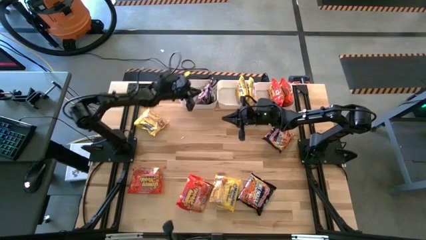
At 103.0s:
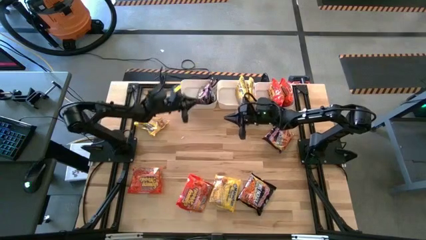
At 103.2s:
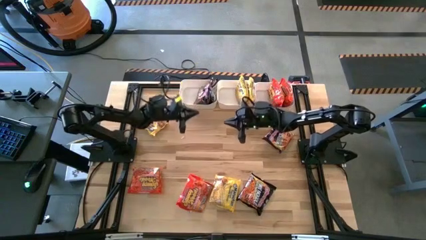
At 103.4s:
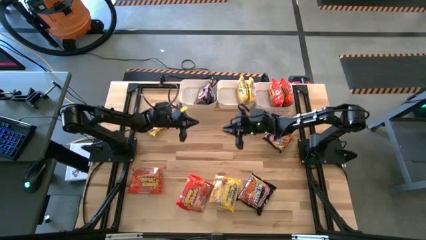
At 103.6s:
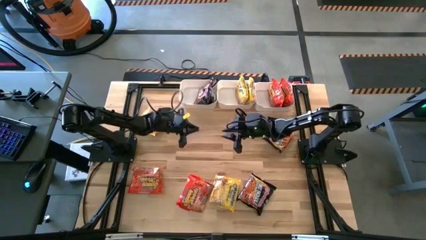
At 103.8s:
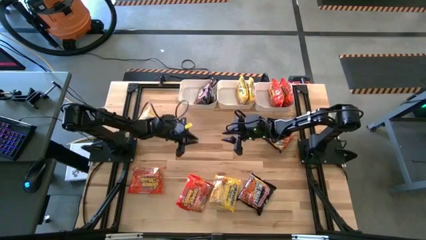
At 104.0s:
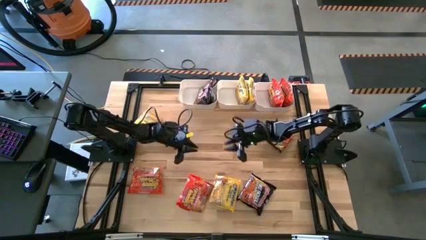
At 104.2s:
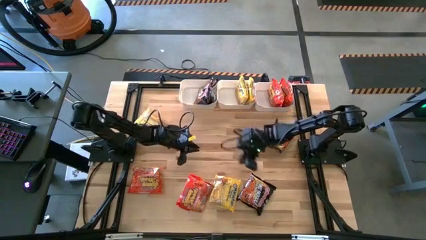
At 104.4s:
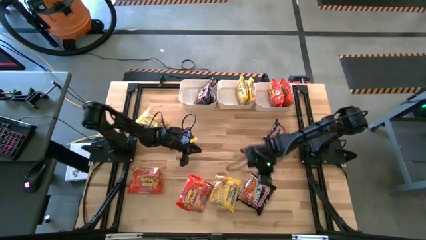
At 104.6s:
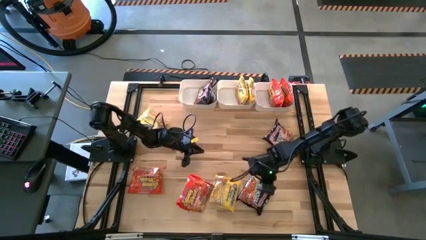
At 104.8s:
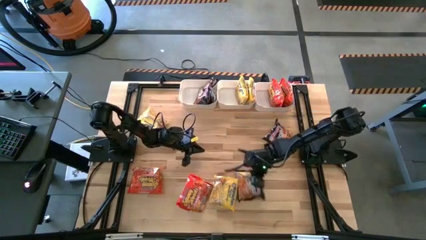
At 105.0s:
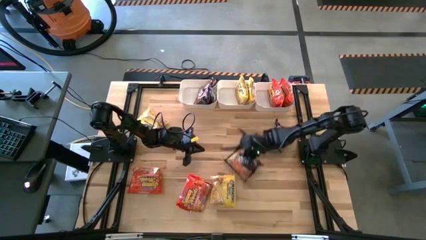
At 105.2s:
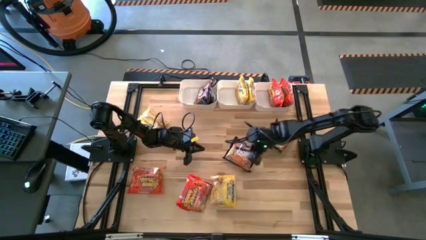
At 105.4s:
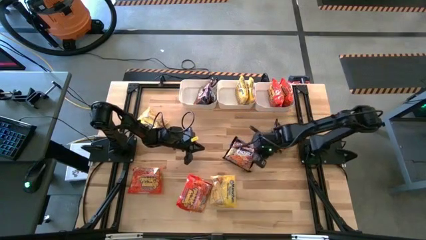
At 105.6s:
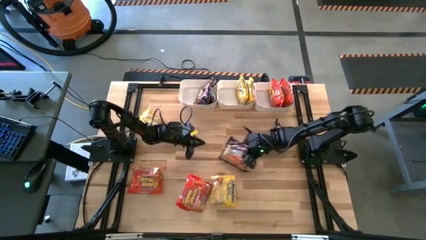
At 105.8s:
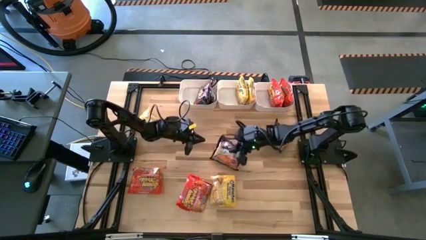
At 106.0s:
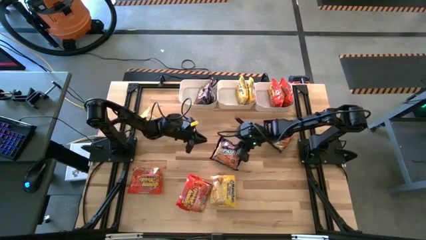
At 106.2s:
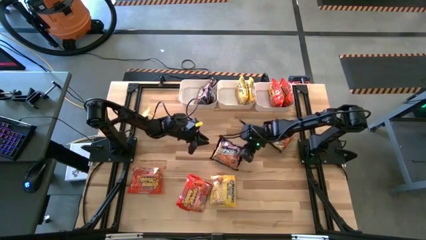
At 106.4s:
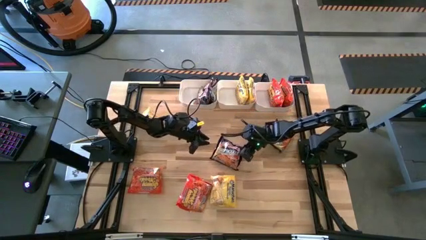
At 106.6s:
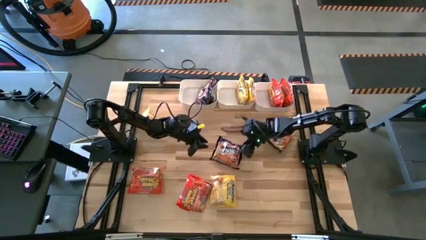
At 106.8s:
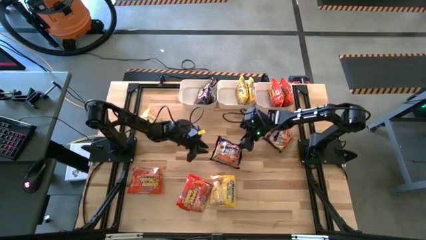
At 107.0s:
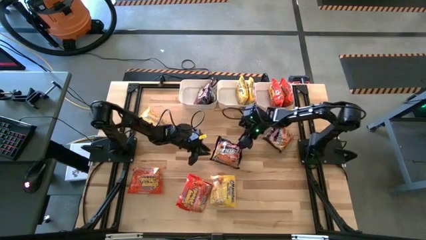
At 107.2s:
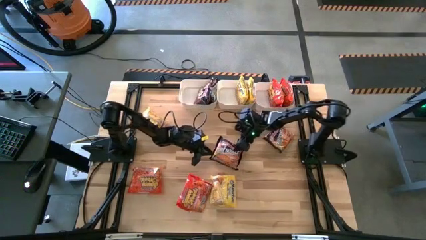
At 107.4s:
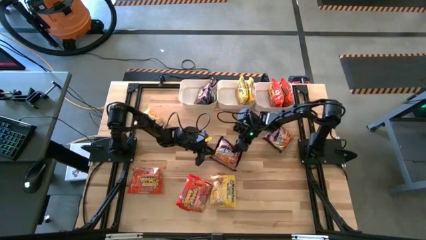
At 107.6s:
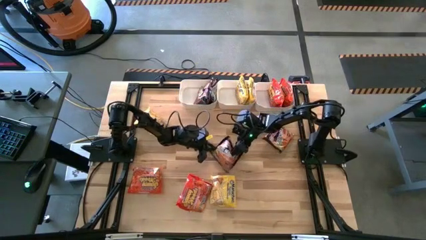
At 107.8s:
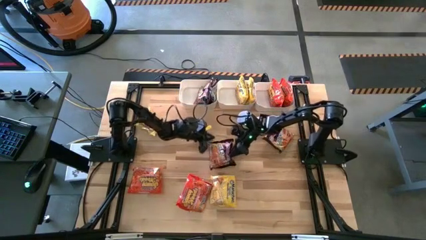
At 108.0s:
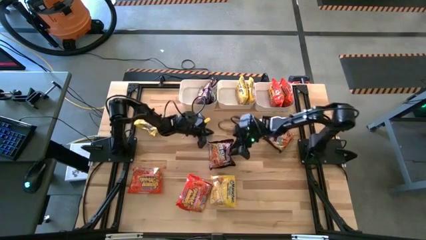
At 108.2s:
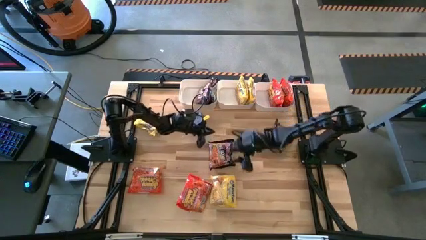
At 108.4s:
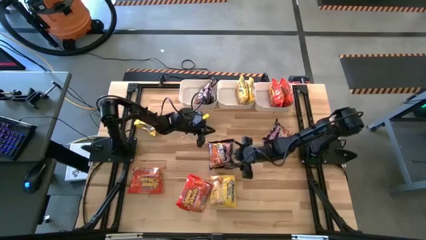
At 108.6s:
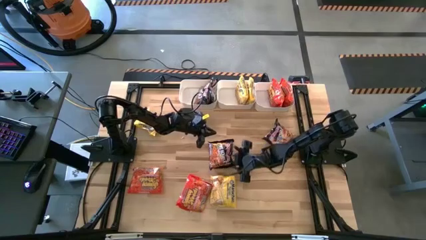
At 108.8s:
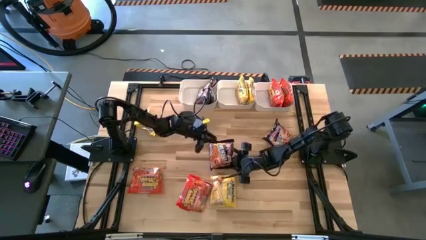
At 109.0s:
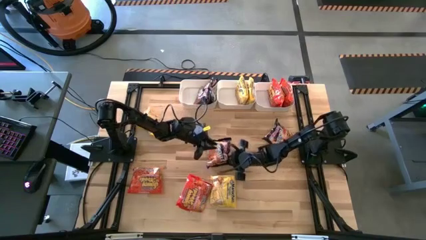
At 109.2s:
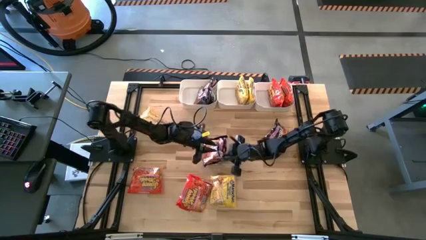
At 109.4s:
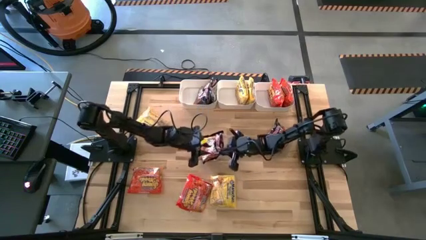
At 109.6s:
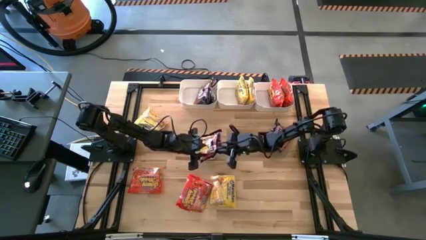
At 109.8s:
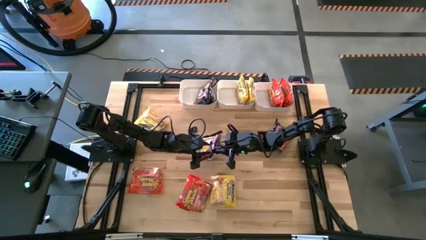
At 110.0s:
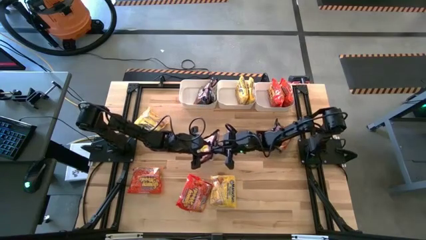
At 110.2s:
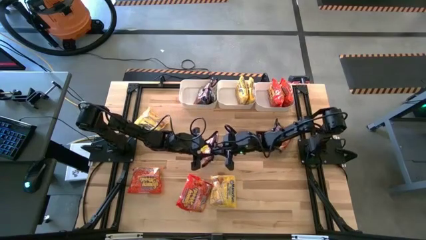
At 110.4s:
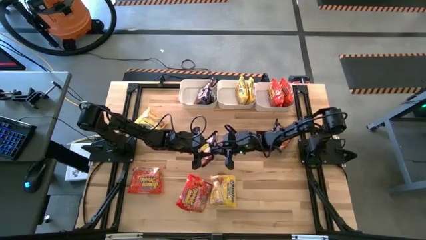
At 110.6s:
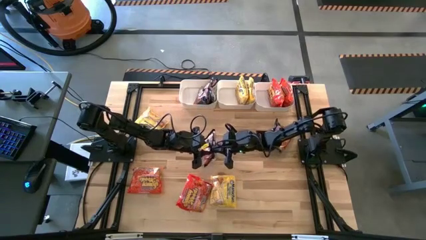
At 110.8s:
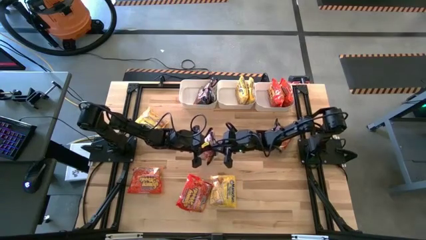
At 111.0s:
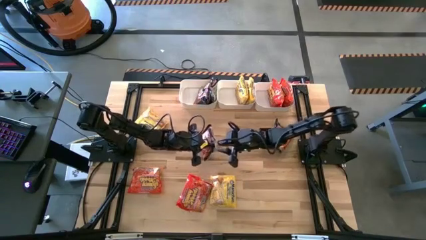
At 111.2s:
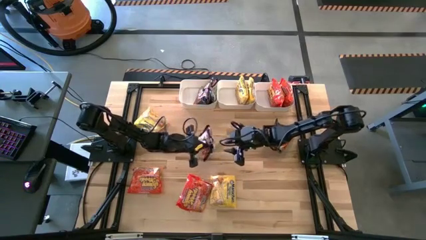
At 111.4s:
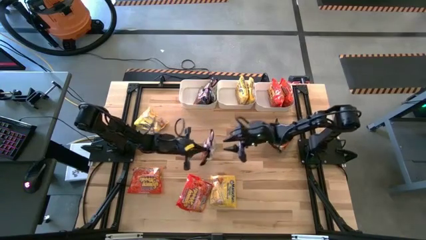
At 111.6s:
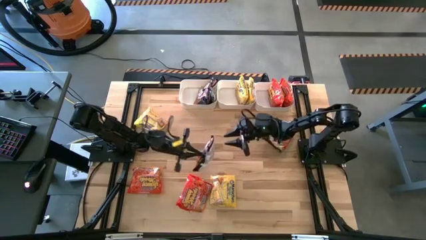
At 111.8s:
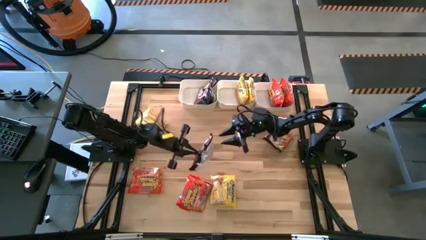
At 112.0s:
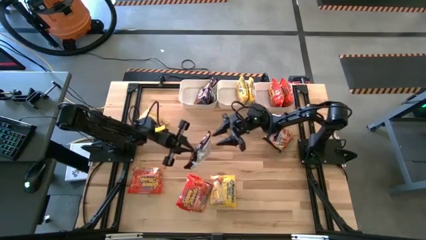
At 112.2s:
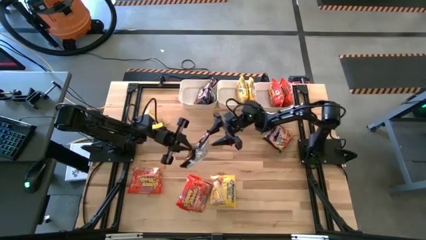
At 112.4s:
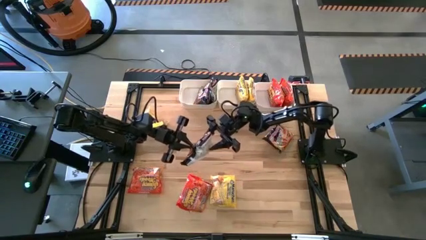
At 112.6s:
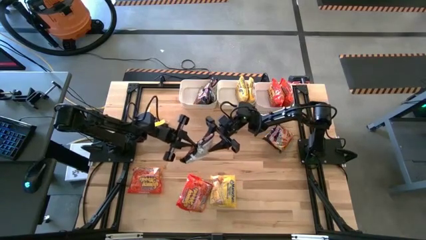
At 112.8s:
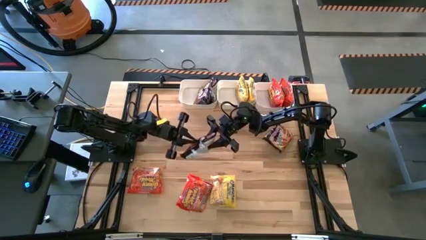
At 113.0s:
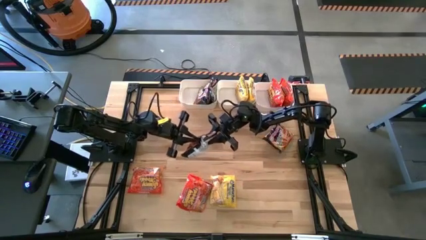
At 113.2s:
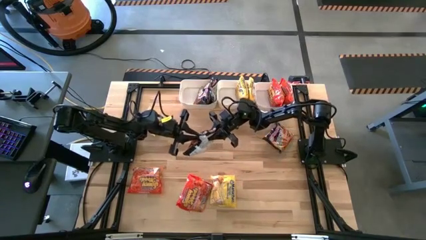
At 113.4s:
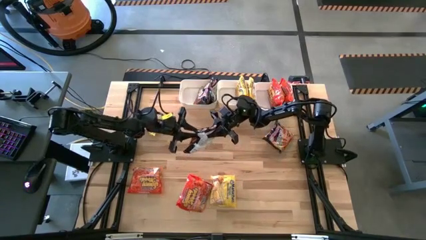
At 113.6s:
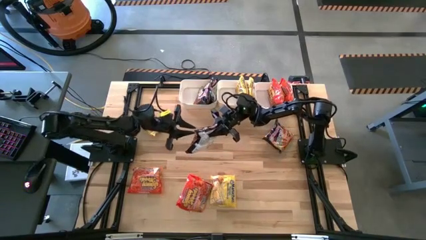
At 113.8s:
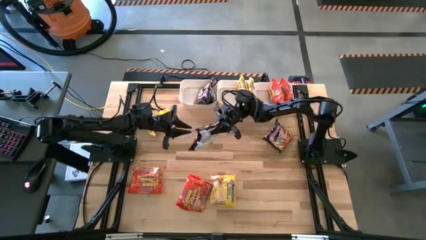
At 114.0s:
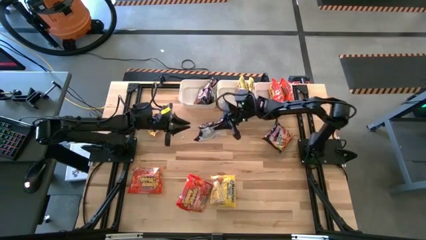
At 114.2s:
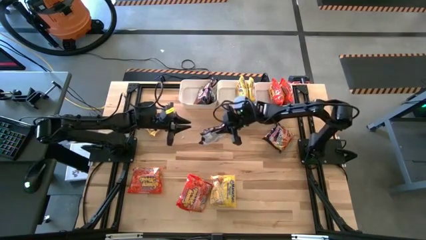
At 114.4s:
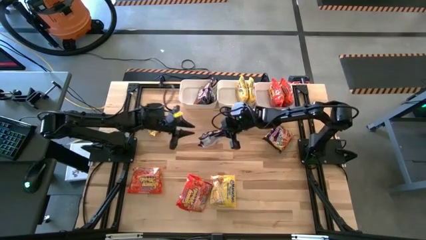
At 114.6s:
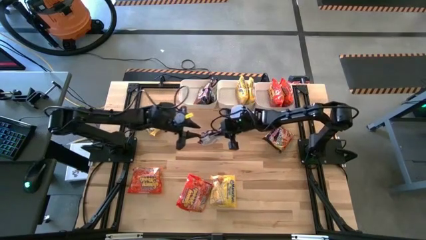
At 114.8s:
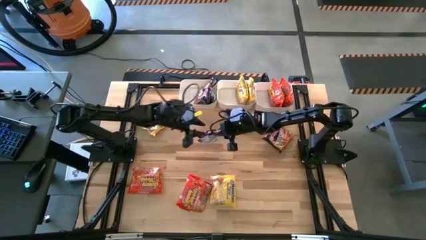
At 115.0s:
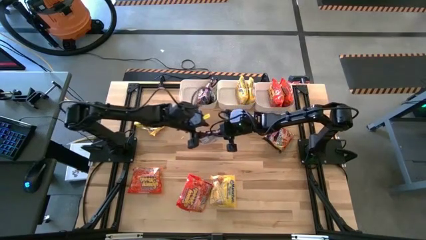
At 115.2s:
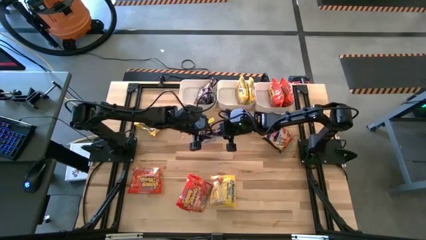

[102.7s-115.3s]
Task: Sort Maruchan noodles
Put the black noodle into the left white bin

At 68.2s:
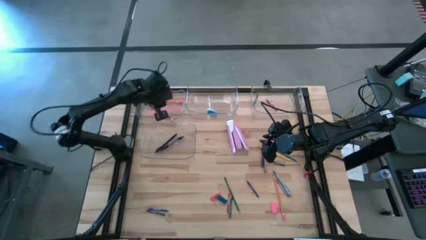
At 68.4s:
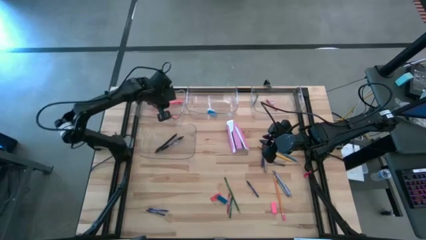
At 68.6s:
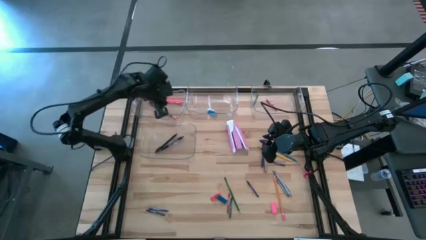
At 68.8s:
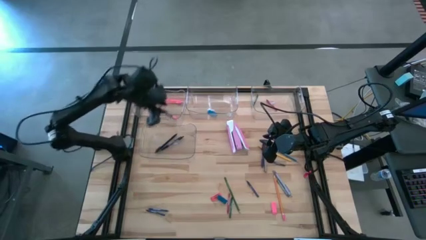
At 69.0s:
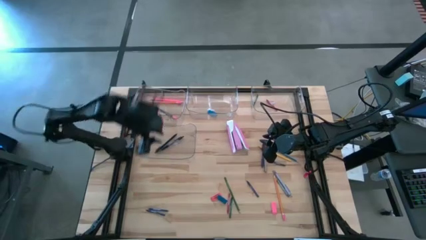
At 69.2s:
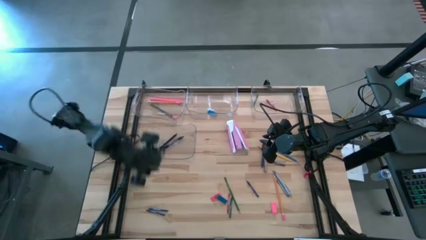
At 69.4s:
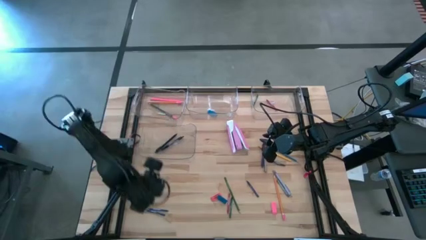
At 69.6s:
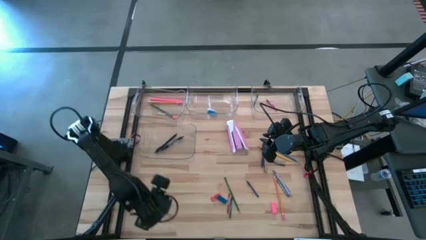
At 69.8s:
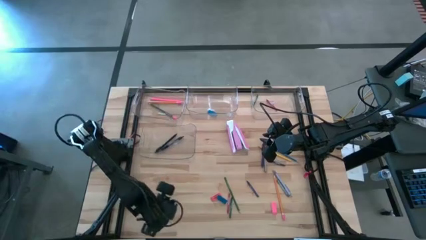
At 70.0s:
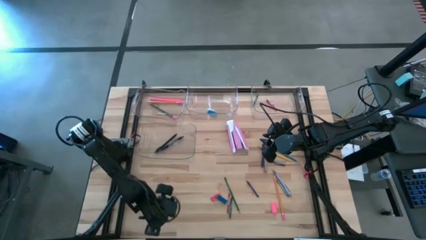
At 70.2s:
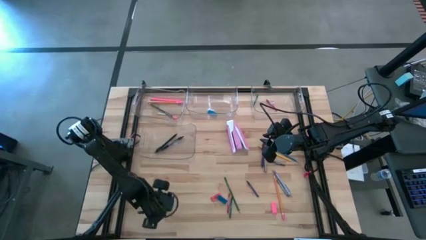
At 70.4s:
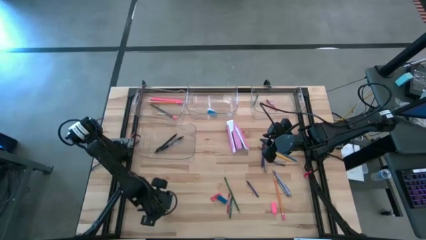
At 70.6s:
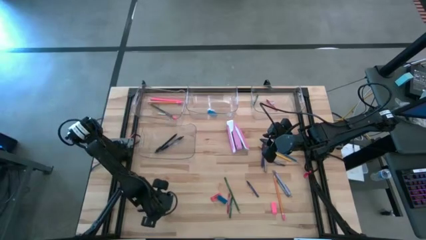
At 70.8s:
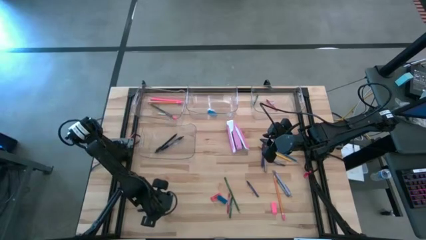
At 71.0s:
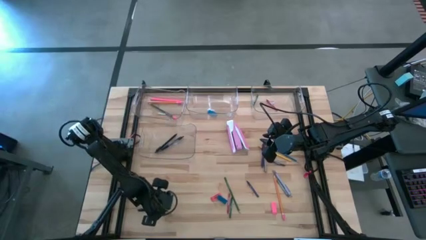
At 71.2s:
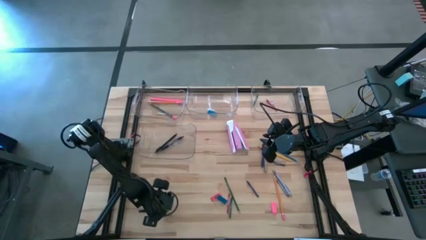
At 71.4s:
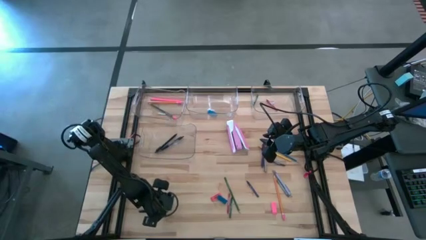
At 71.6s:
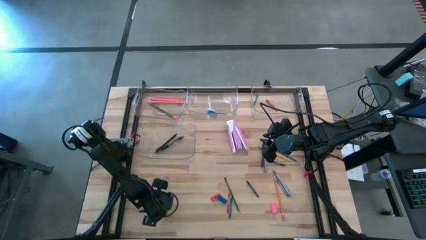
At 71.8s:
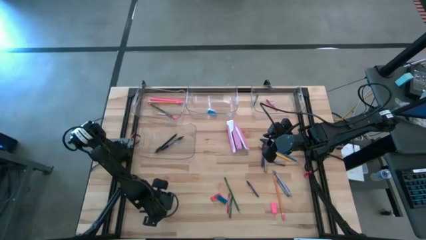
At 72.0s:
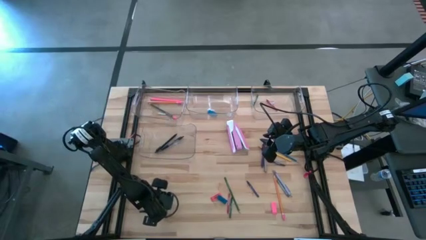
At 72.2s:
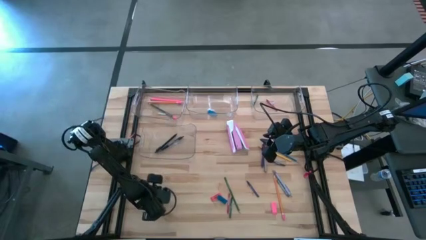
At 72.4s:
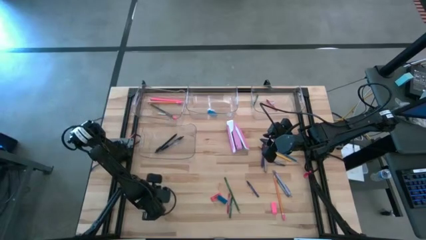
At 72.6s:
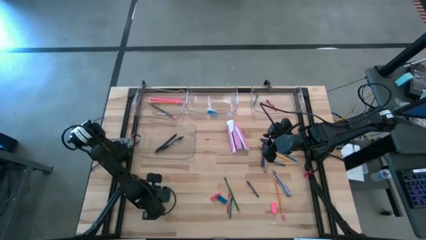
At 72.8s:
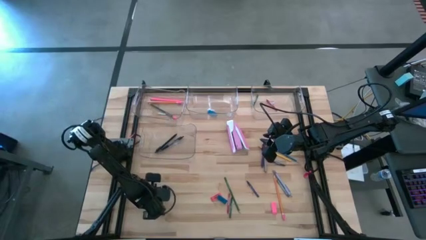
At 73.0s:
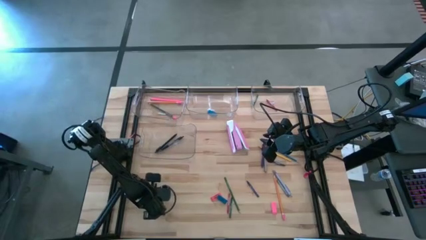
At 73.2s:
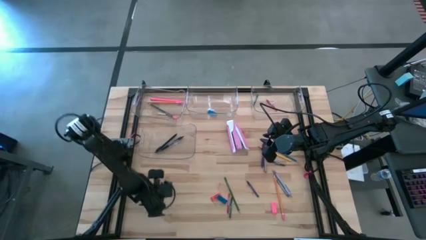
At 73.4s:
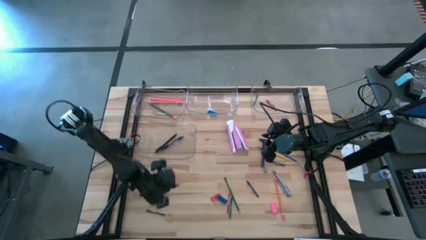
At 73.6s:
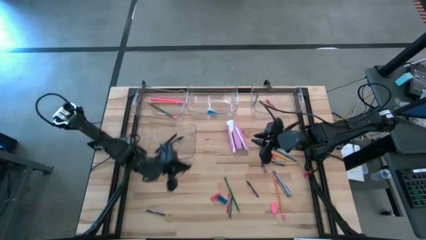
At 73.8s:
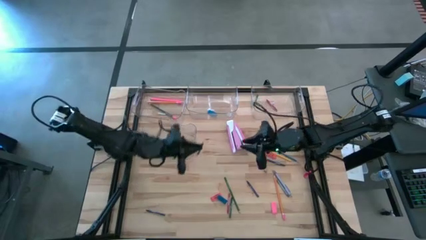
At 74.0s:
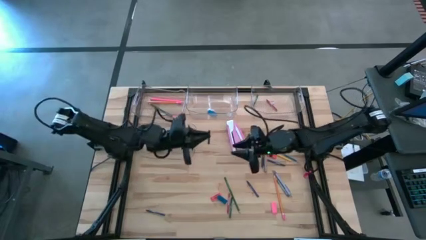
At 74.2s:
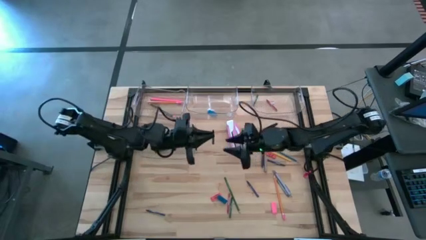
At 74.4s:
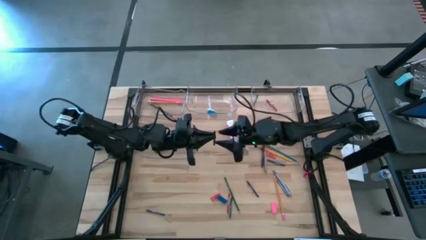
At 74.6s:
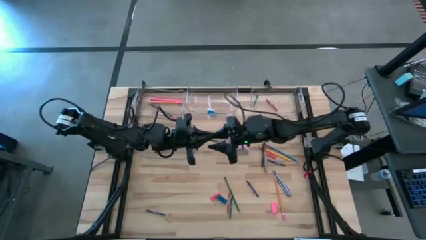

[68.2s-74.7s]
Task: Sort crayons/erasers/pens/pencils in bins
Put the blue crayon into the top right transparent bin
